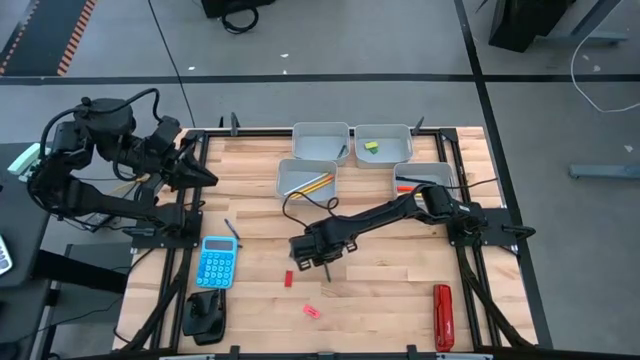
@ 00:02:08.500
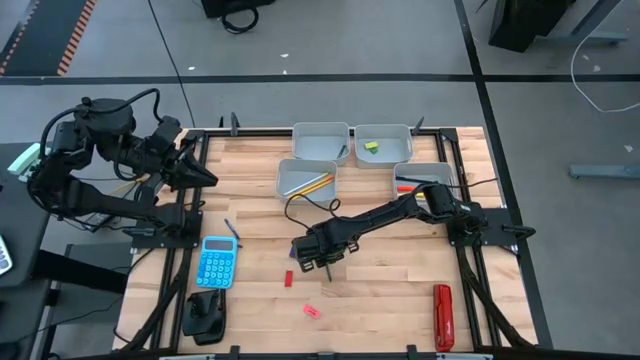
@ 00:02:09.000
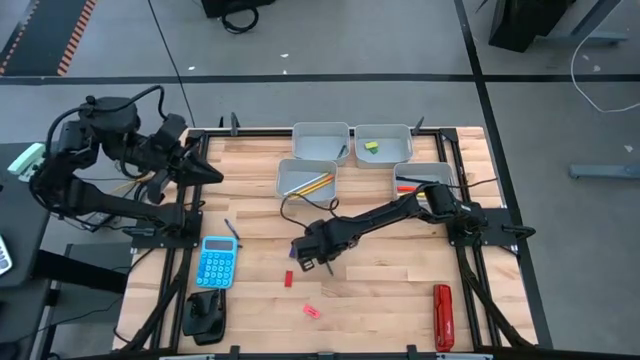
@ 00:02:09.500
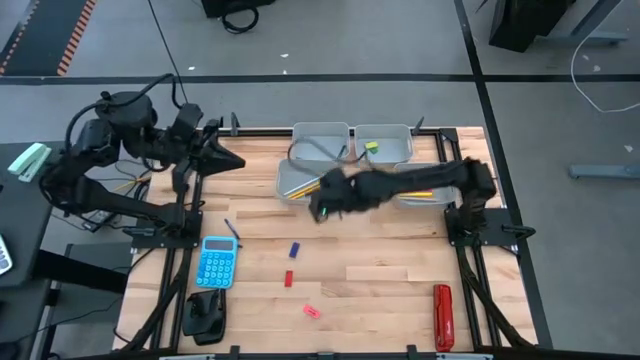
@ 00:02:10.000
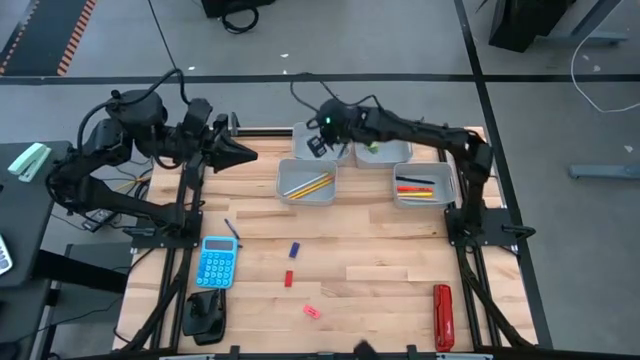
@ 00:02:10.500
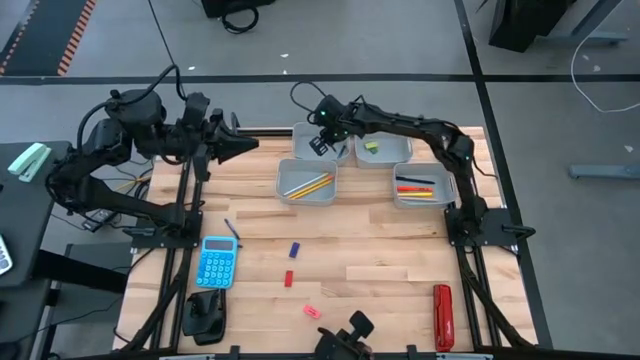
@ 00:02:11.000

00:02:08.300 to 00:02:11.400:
Task: Sort crayons/erasers/pens/pencils in bins
Put the green crayon into the top right gray bin

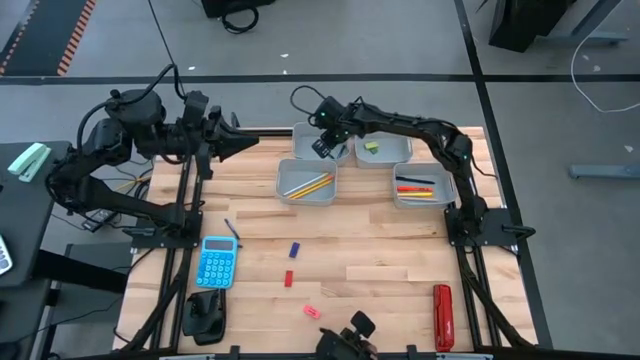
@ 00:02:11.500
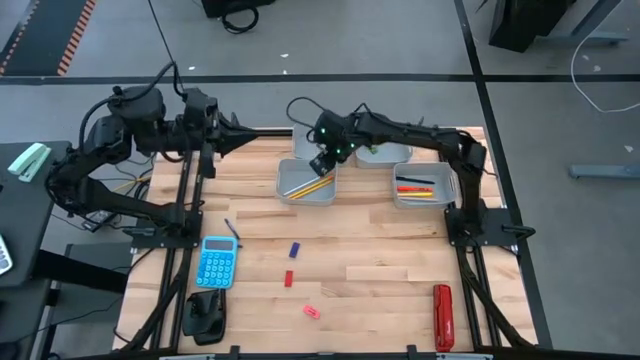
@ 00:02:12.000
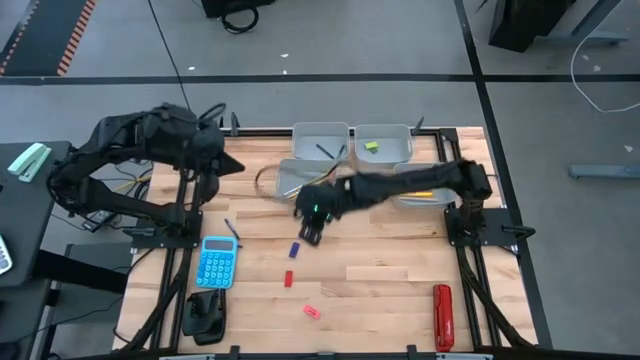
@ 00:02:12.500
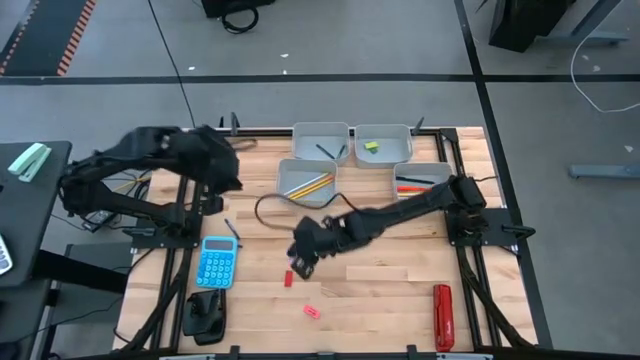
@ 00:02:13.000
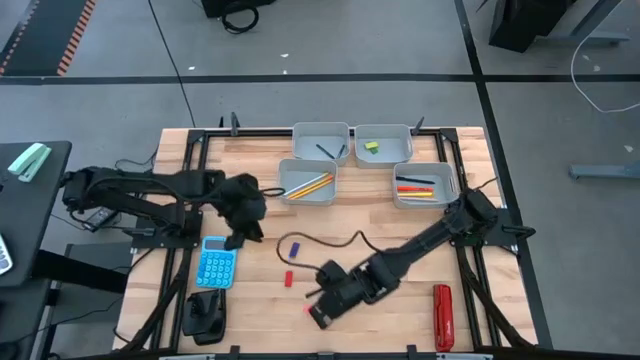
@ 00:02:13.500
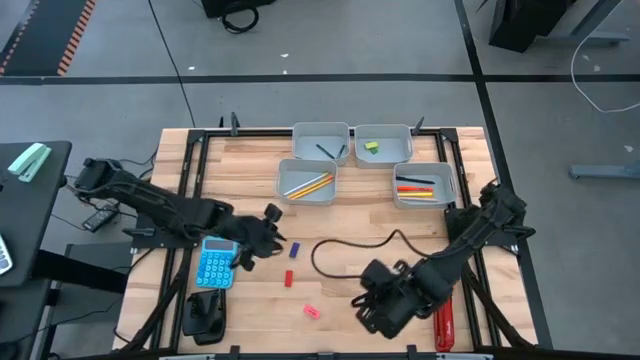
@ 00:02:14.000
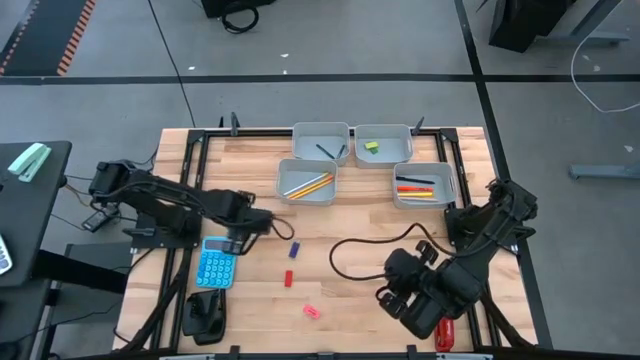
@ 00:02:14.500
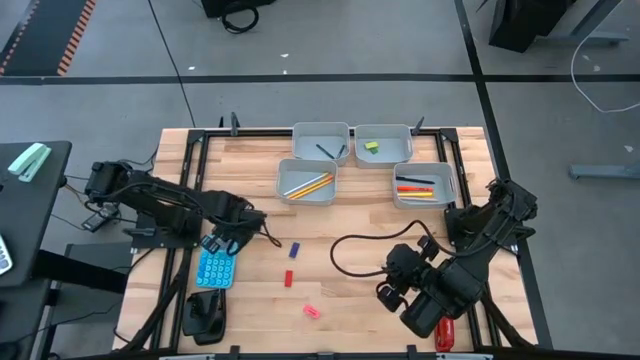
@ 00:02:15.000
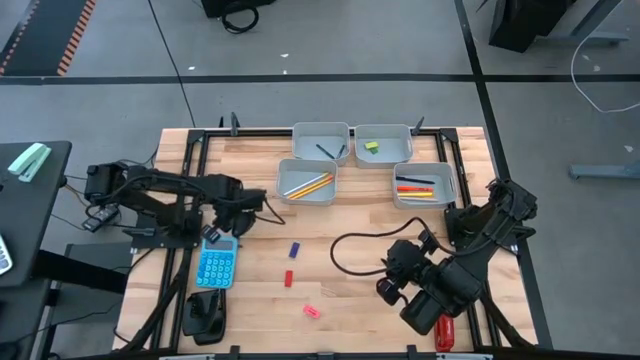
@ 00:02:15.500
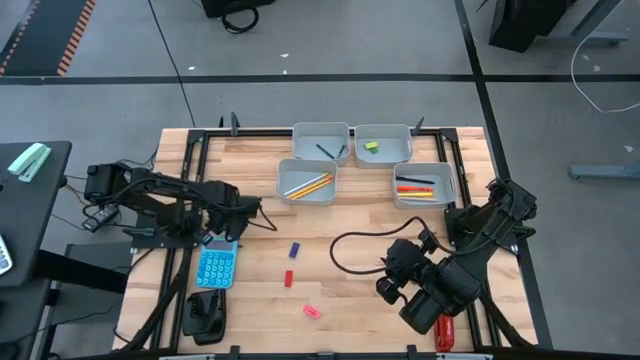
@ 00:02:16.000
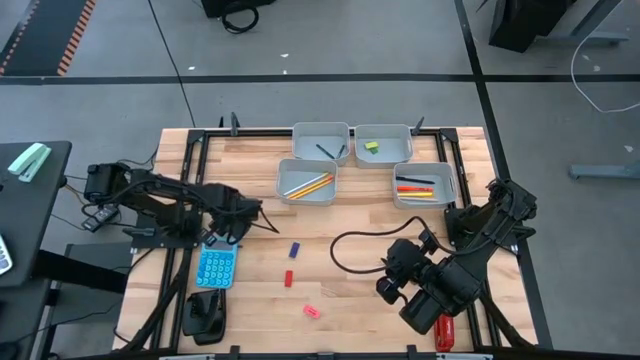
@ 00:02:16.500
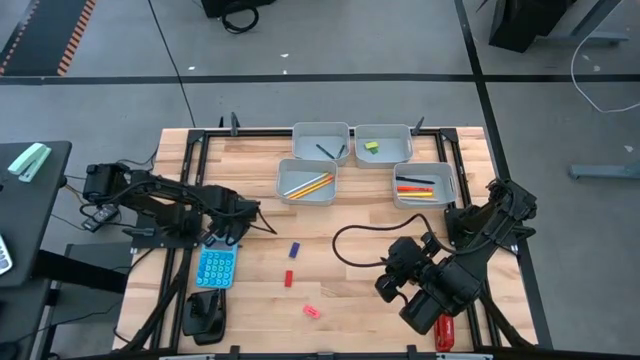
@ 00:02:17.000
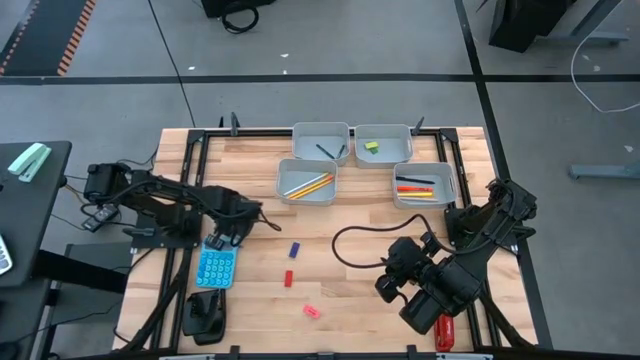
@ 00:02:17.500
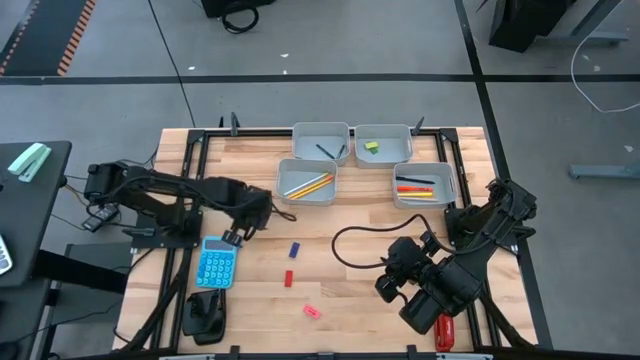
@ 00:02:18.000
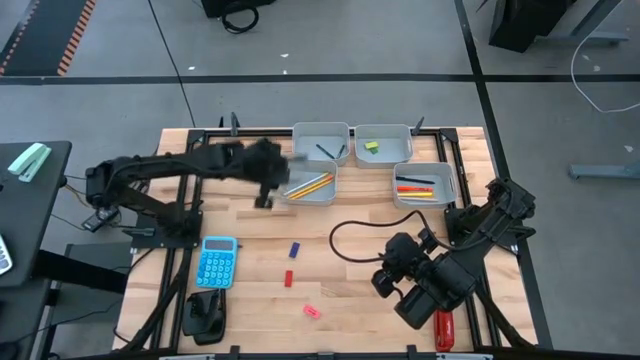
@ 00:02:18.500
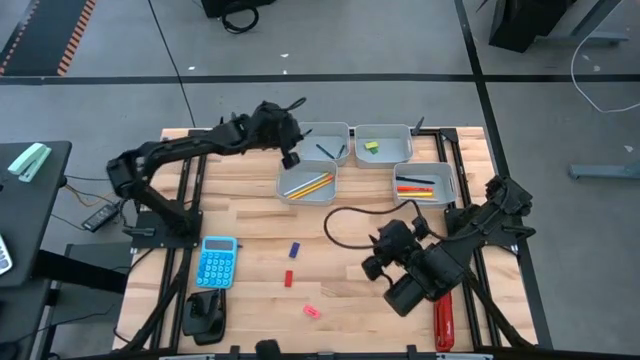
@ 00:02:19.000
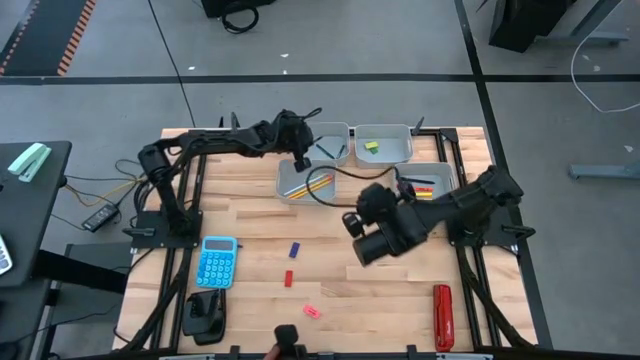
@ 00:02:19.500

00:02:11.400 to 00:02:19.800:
Put the top blue crayon into the top right gray bin

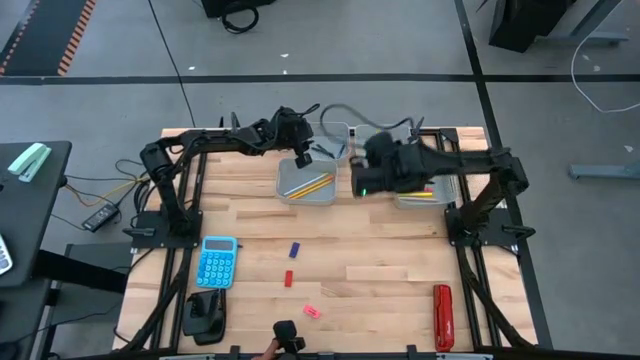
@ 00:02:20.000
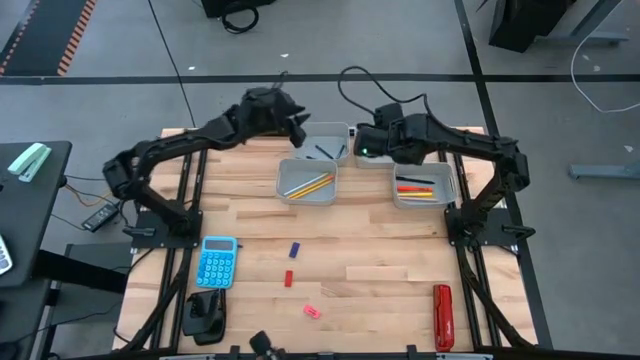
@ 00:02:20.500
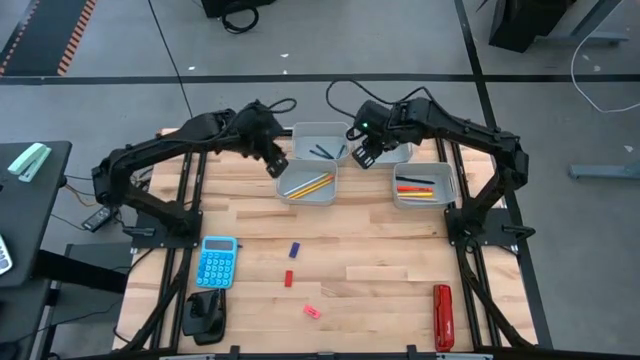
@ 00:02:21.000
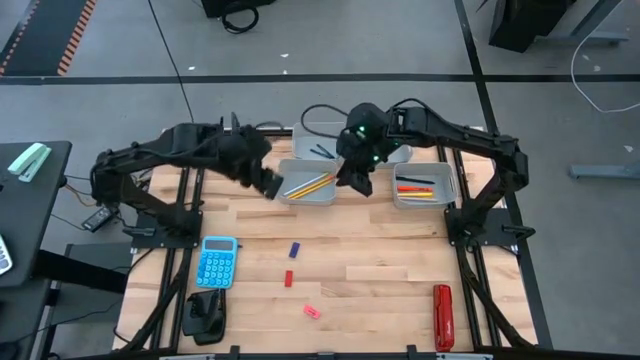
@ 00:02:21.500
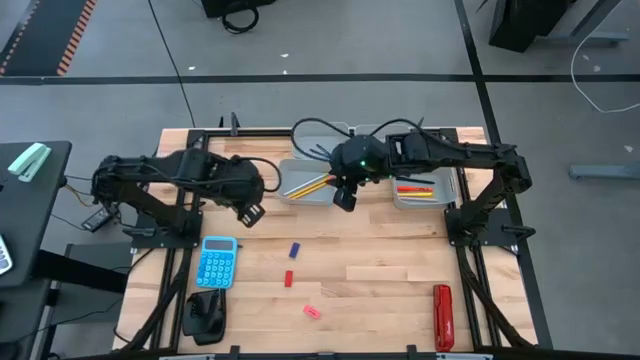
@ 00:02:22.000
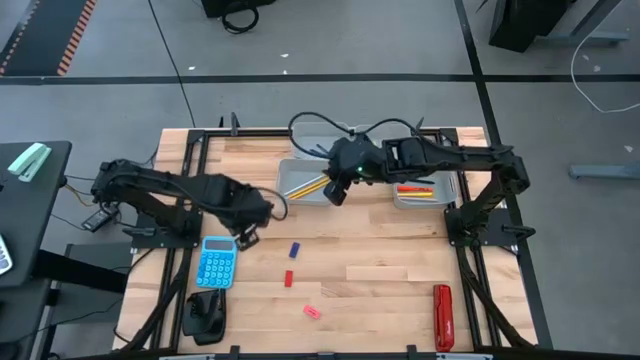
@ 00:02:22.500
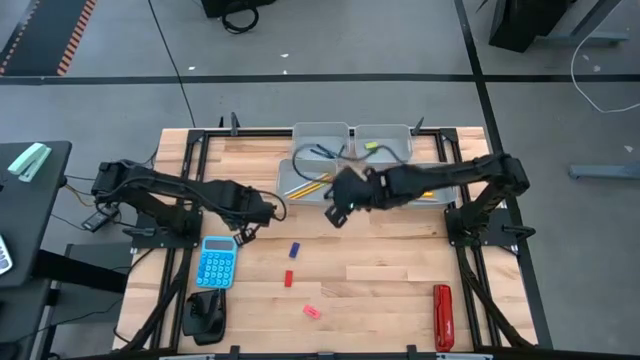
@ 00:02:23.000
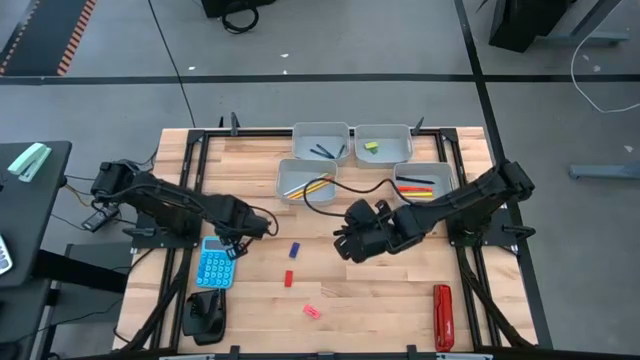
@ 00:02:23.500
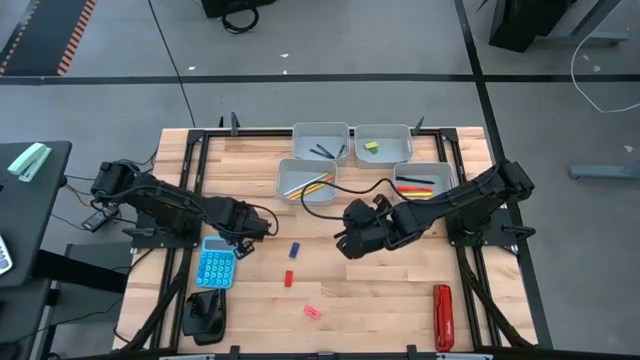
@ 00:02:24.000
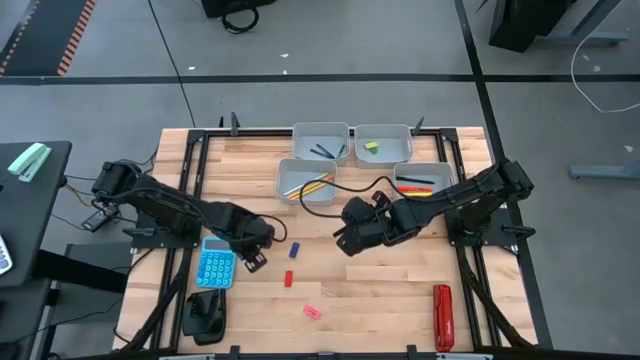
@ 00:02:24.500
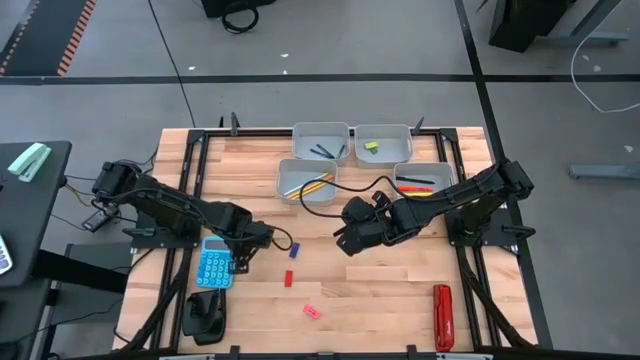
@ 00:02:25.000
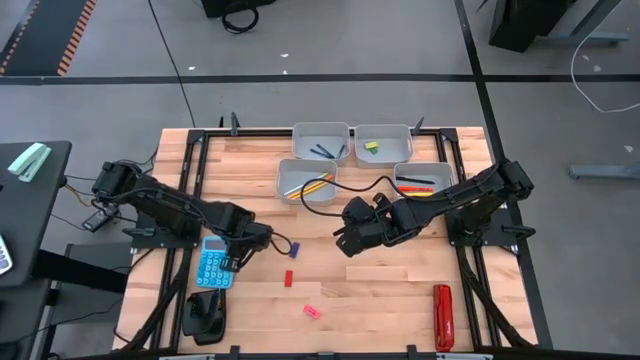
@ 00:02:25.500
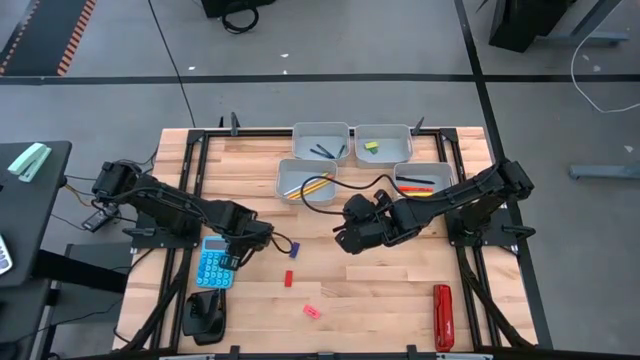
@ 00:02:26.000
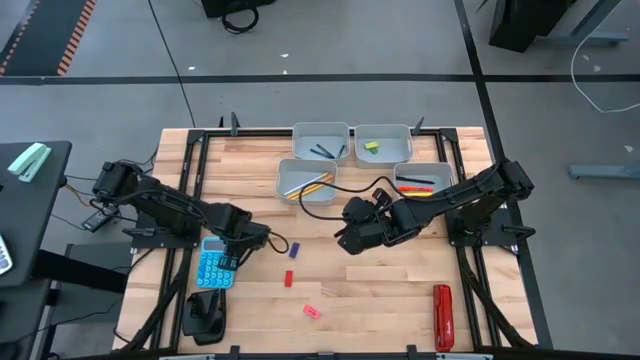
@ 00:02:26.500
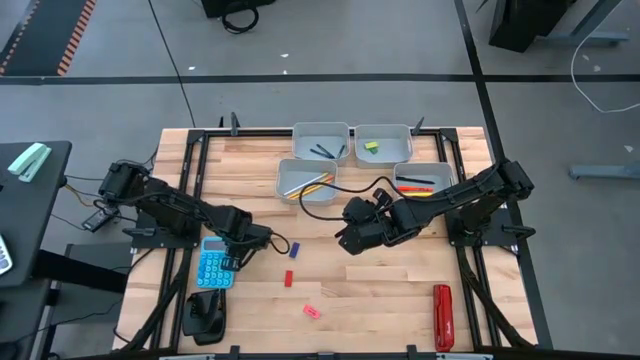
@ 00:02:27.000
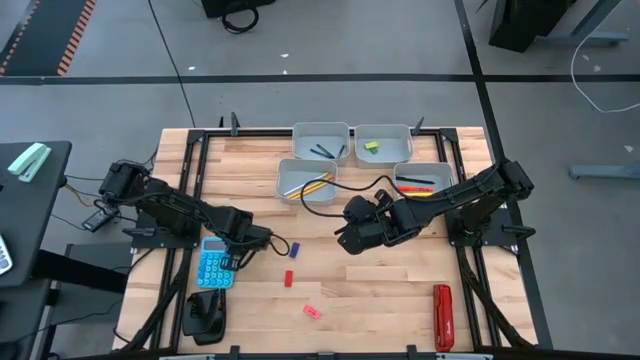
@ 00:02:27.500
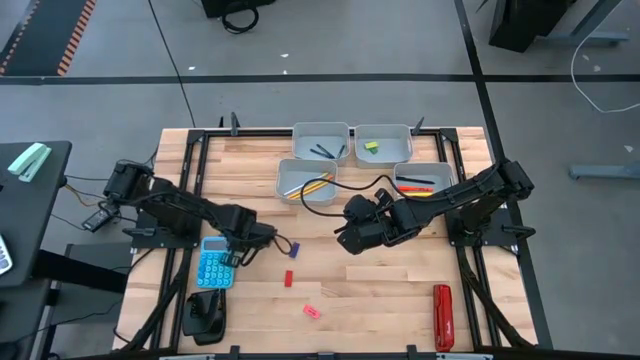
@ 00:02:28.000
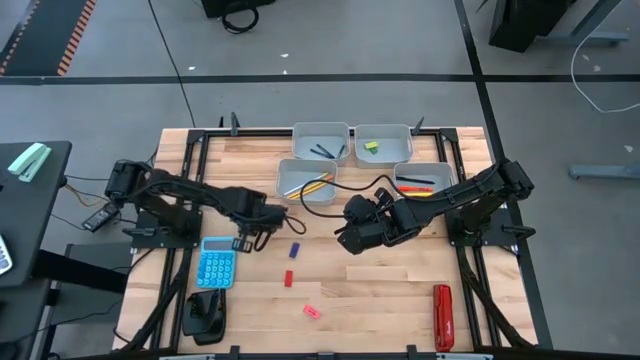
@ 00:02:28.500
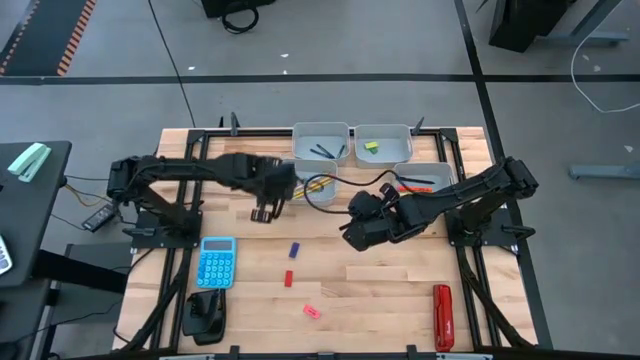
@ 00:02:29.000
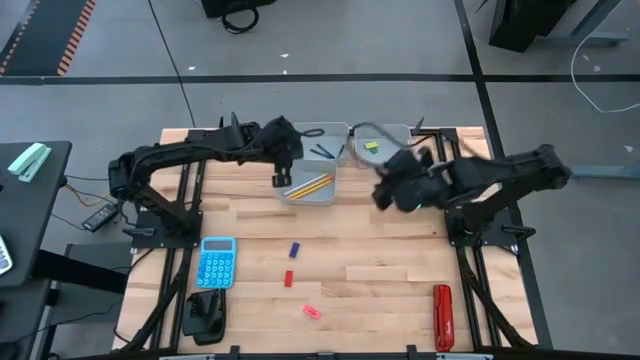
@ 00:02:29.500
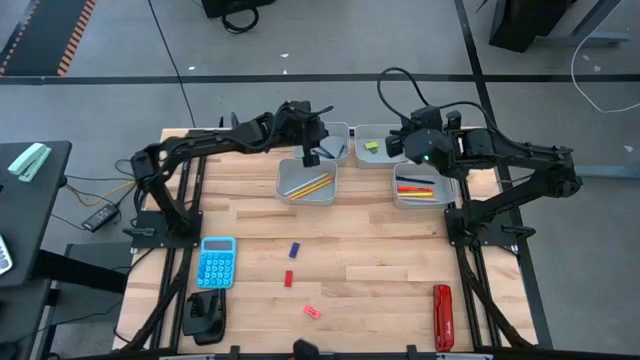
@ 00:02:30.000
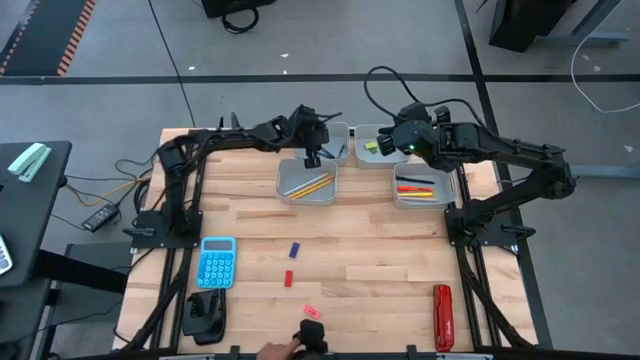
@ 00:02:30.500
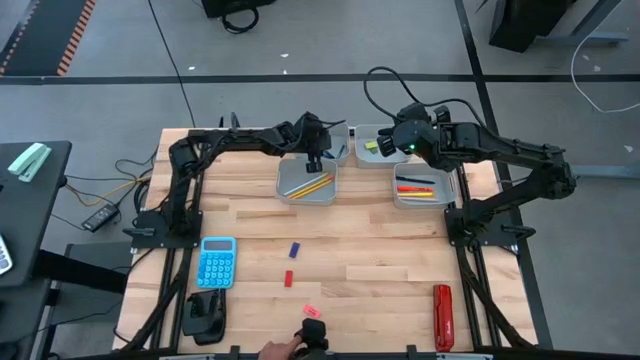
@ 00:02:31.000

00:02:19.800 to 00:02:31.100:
Put the blue crayon into the top right gray bin
